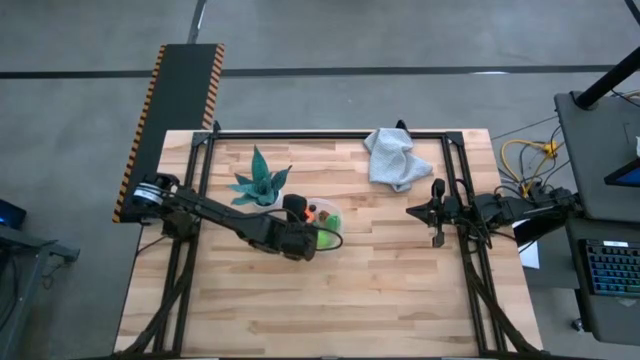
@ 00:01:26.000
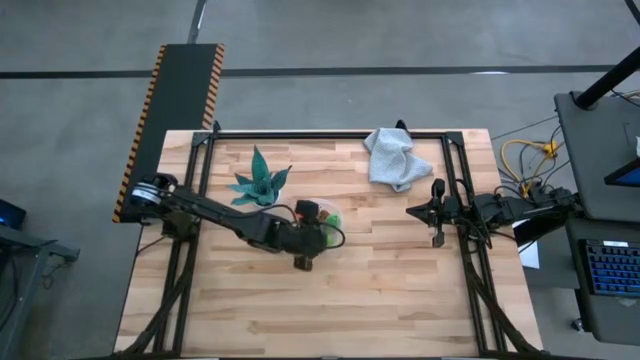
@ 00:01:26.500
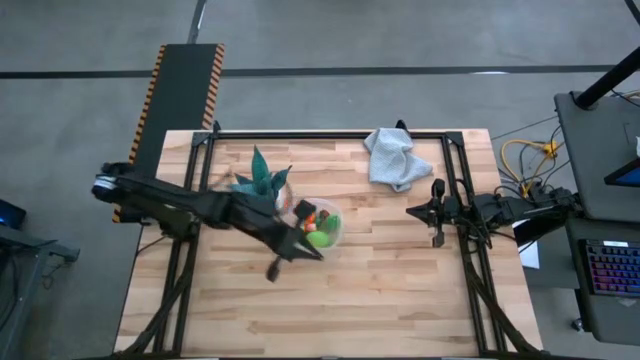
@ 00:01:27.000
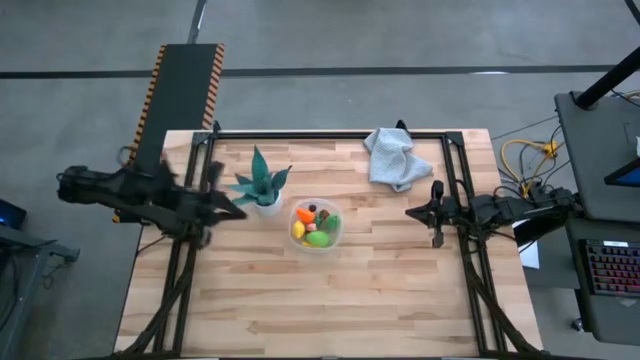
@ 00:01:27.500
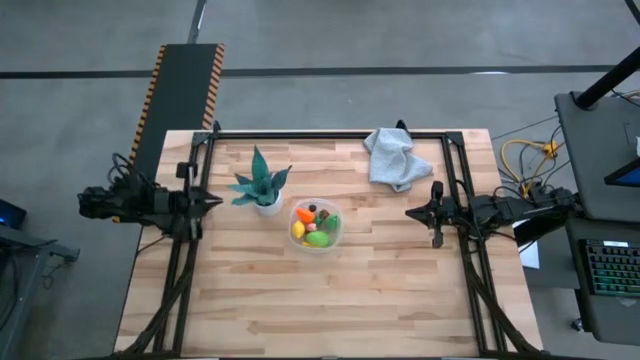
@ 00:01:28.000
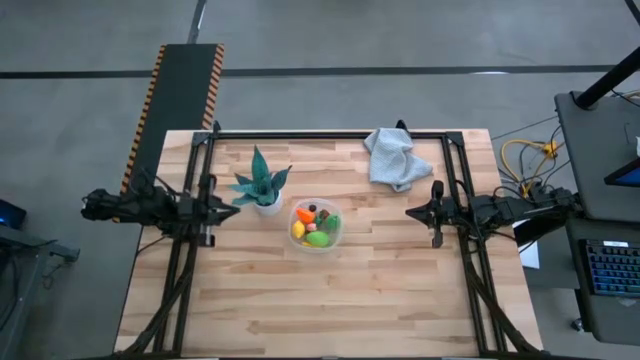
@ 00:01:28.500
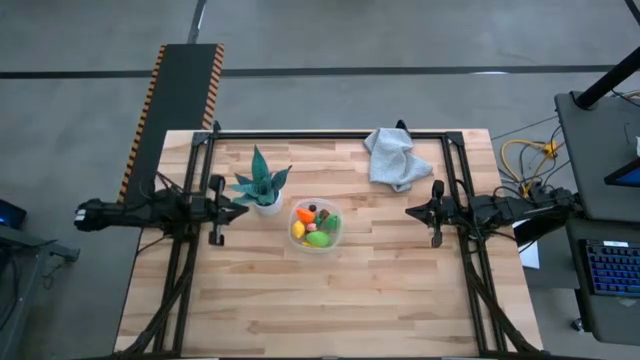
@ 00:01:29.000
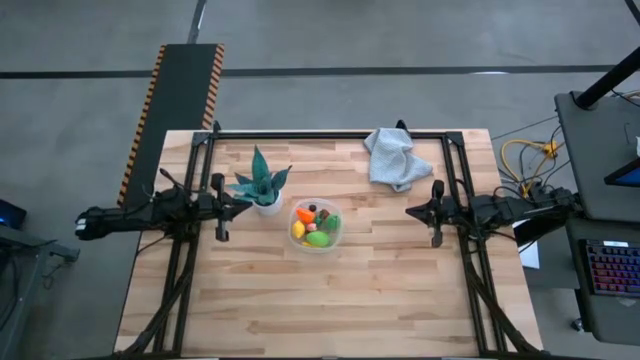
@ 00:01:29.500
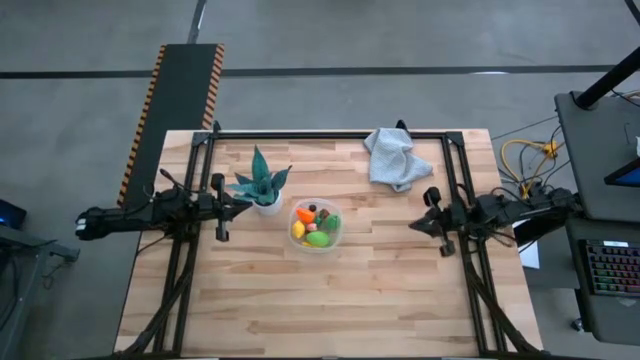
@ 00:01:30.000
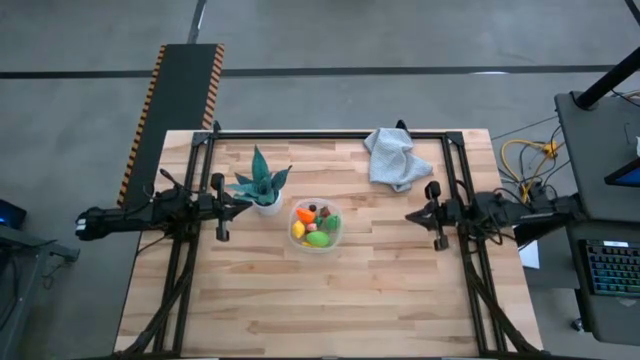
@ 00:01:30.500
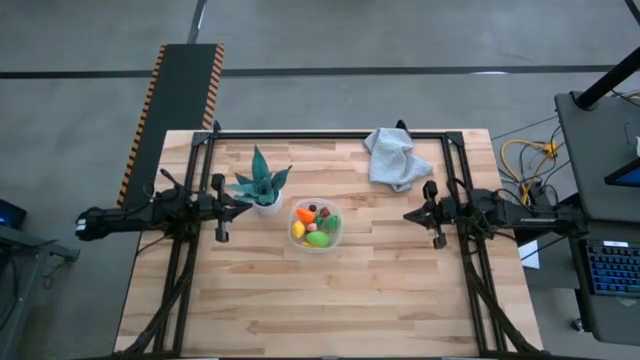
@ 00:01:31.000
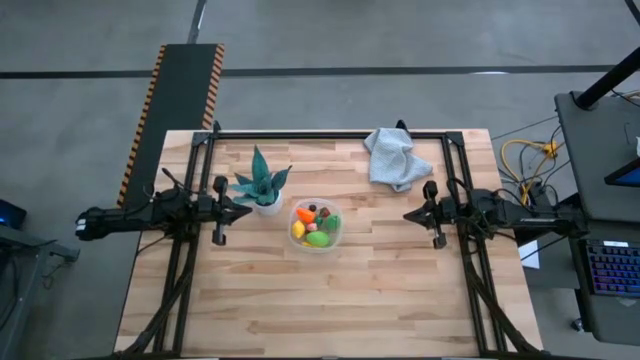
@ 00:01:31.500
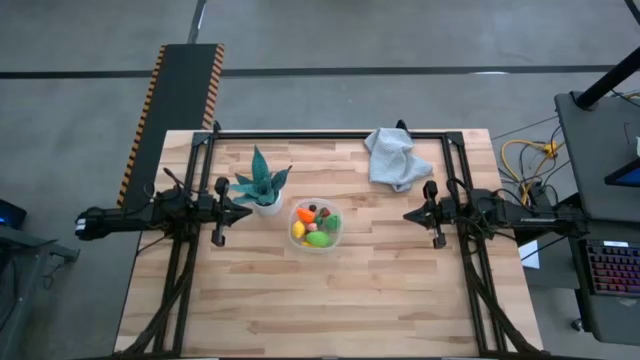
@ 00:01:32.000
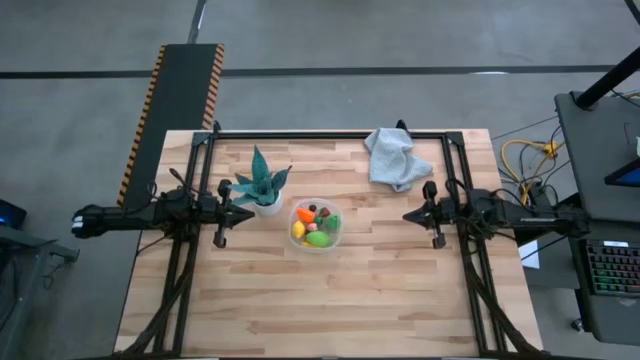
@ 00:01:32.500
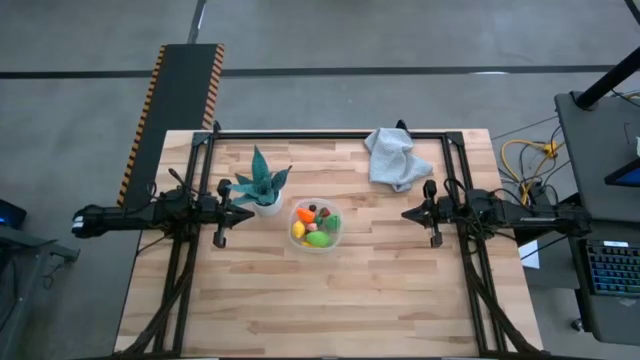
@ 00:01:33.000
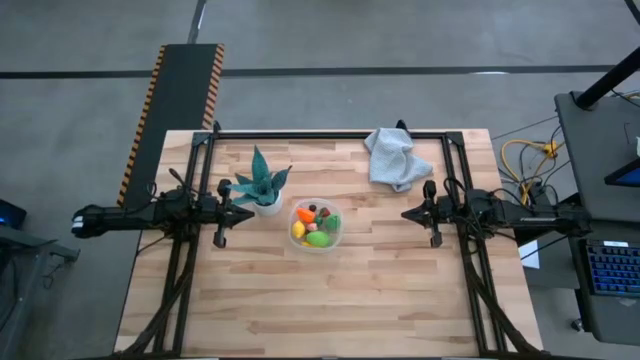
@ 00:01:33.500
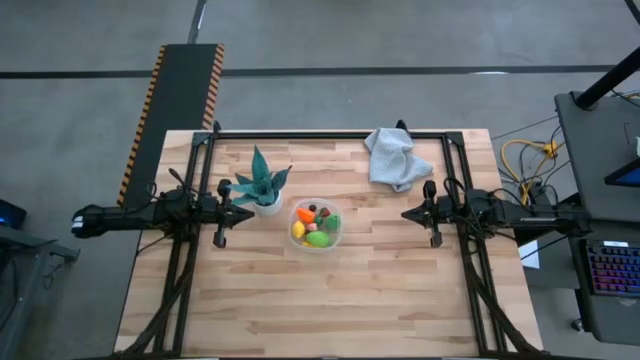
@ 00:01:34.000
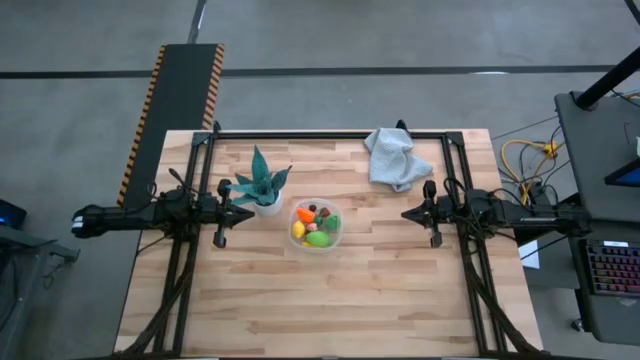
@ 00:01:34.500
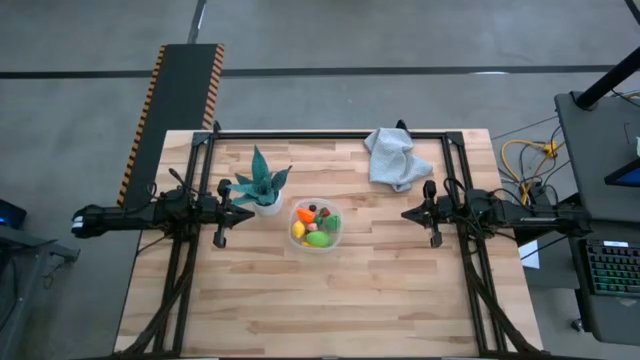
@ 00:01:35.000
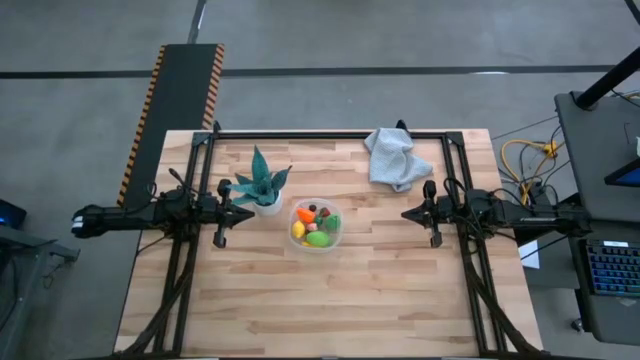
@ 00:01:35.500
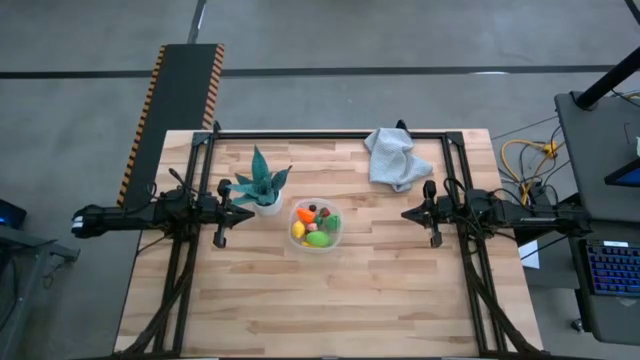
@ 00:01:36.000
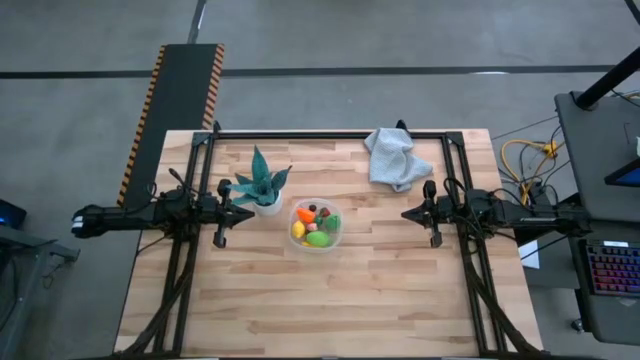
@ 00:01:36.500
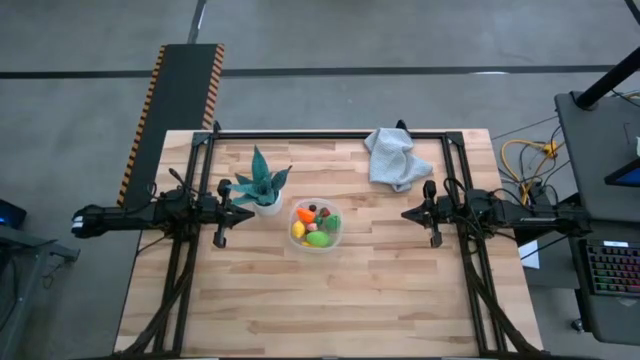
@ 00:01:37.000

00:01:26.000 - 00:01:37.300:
Task: Pick and placing Produce into tupperware
Return to Home Position

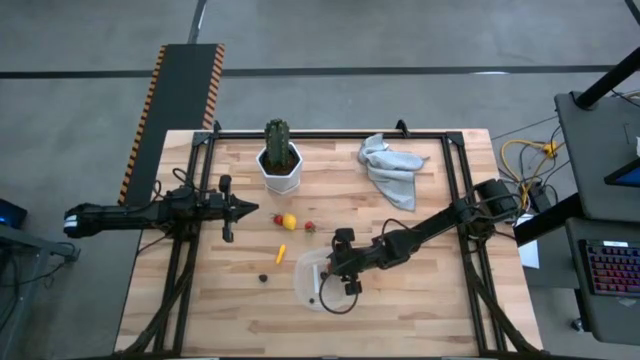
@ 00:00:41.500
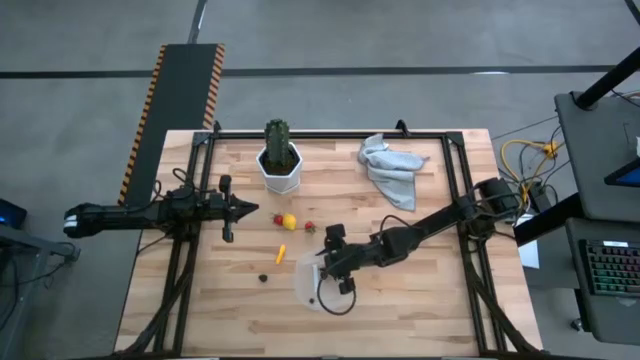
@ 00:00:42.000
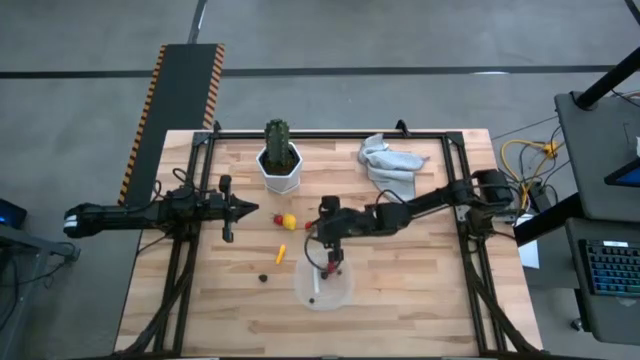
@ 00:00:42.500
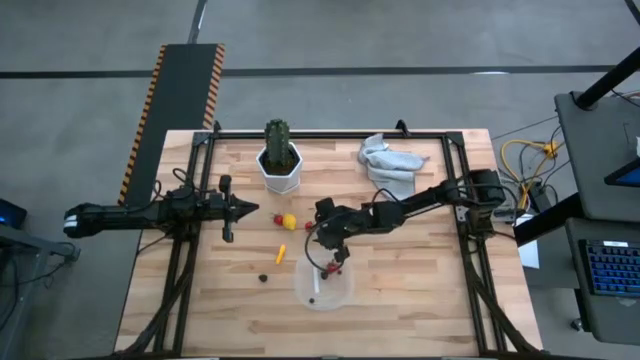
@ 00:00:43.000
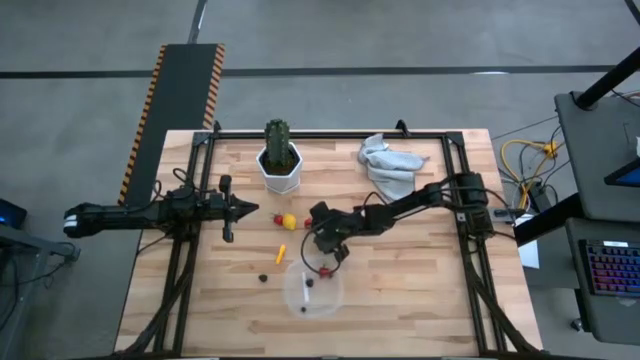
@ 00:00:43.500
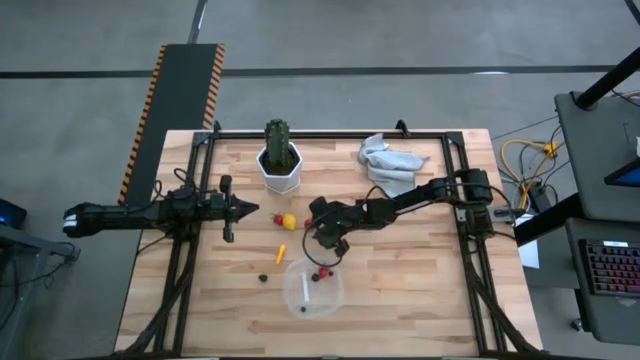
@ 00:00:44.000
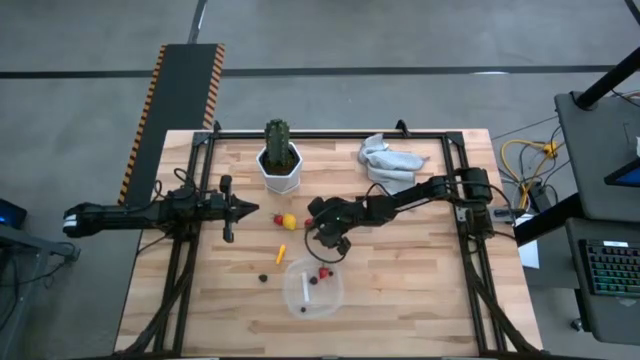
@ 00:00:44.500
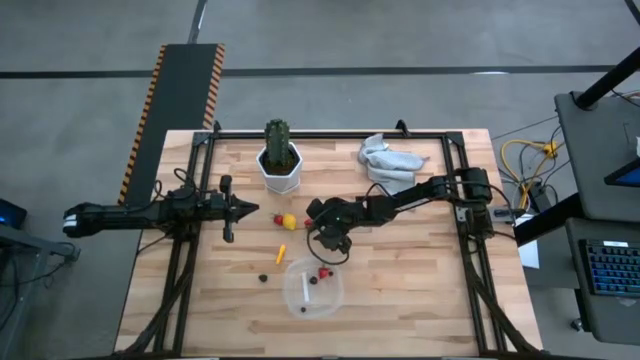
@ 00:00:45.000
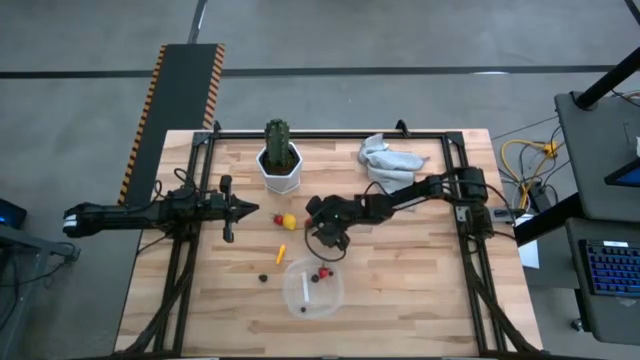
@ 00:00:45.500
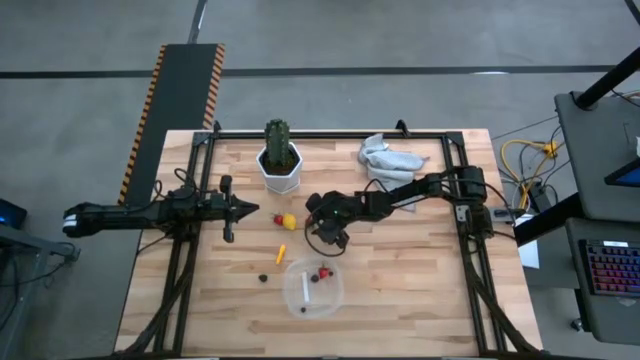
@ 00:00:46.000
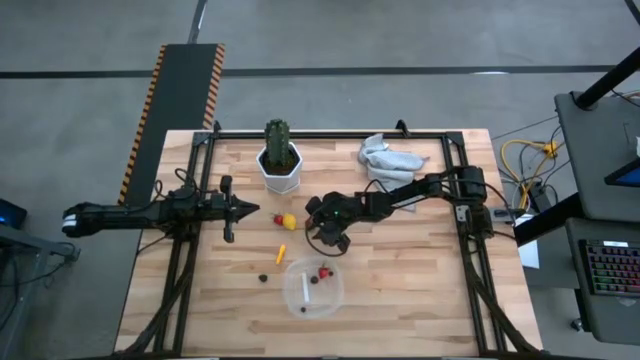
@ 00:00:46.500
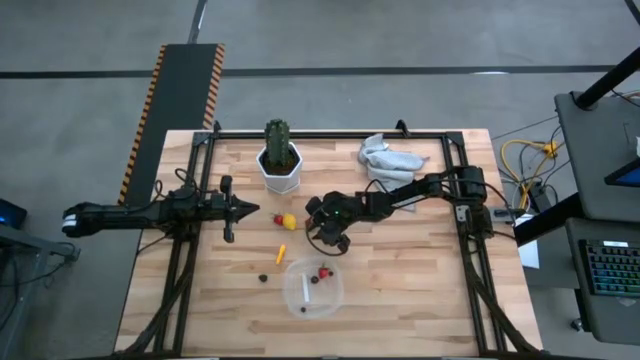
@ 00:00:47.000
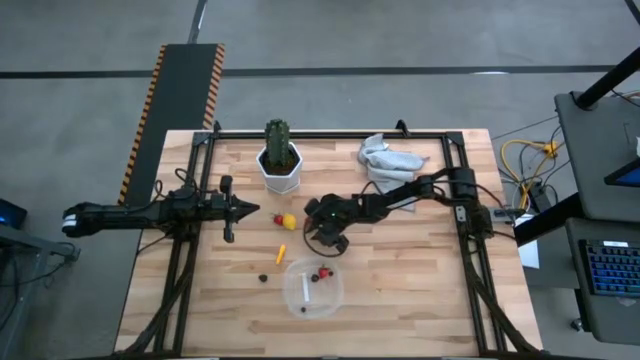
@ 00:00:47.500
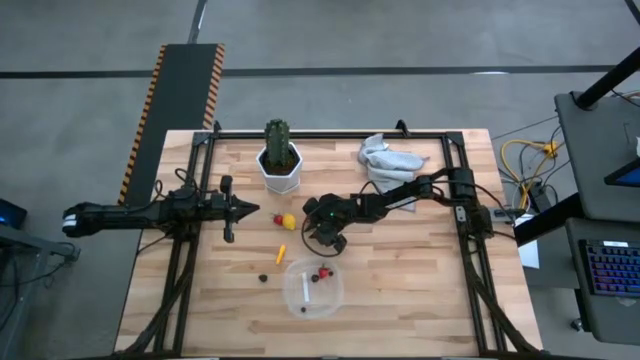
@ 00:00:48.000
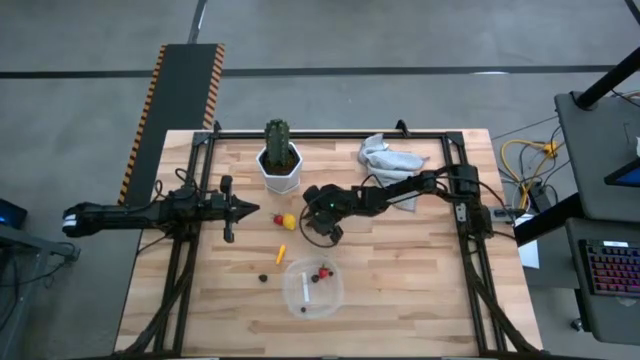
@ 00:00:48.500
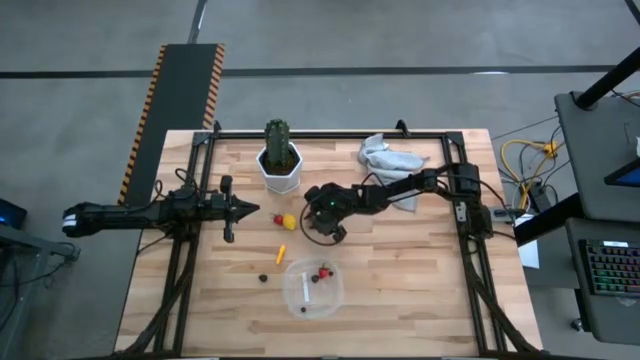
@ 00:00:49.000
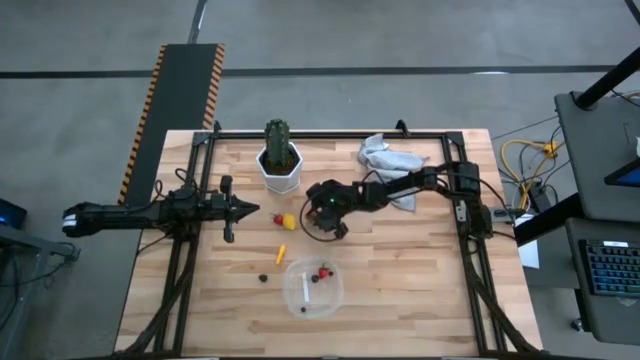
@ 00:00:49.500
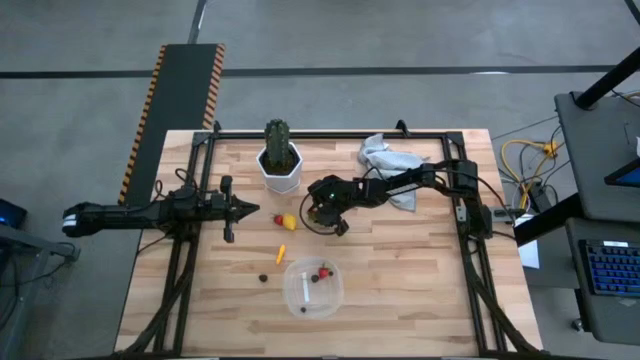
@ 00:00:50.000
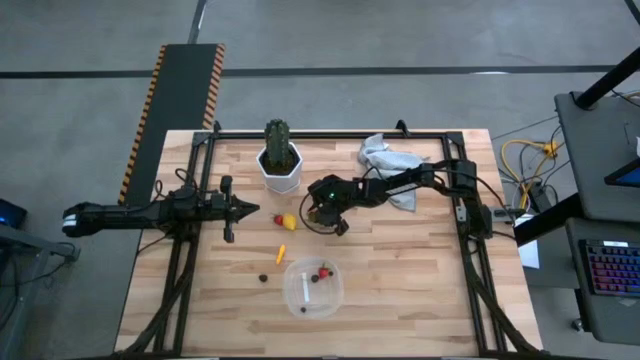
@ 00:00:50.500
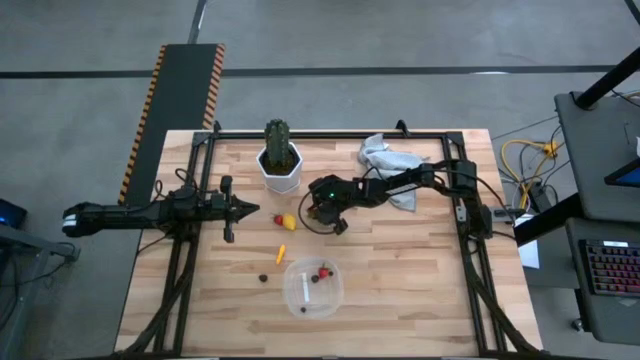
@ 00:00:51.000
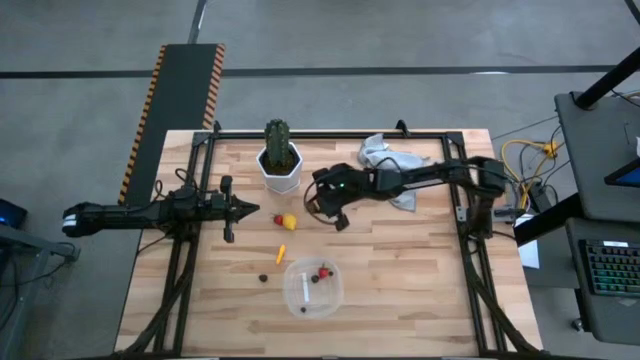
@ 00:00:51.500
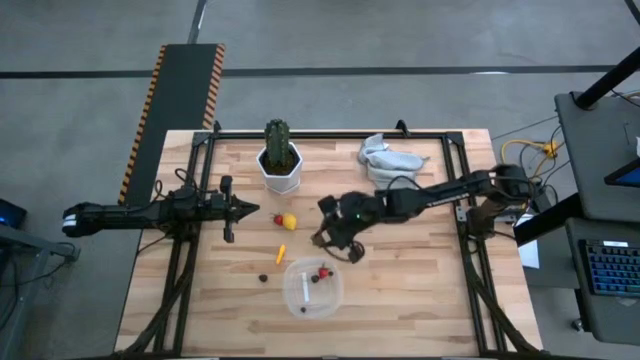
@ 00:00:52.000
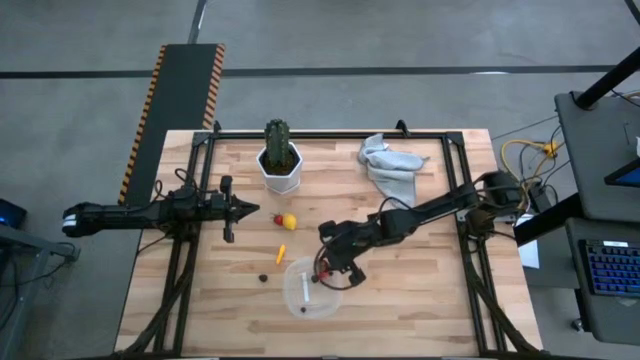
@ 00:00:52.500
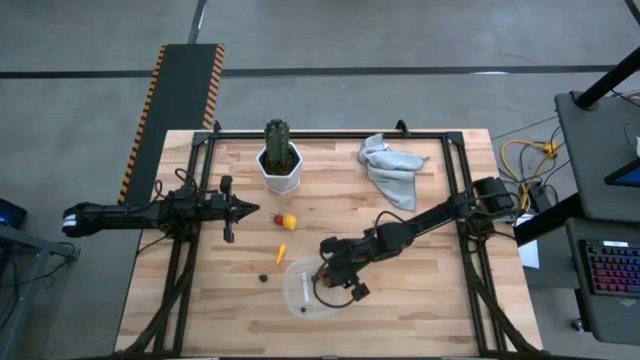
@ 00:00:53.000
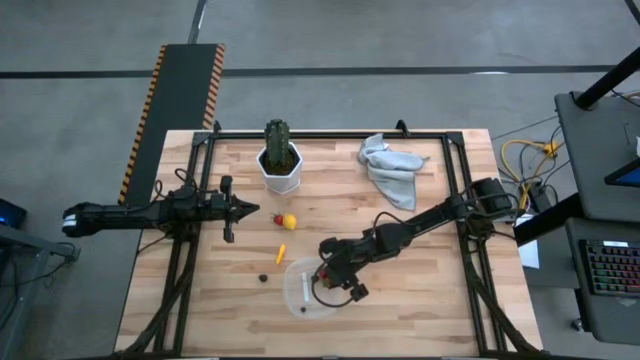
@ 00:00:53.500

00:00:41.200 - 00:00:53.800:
Task: Pick and placing Produce into tupperware
Put the right red strawberry into the transparent container
